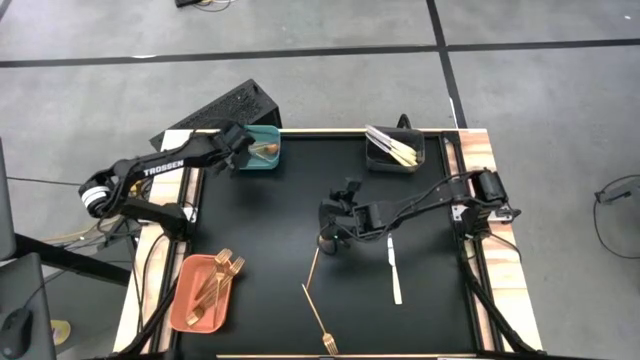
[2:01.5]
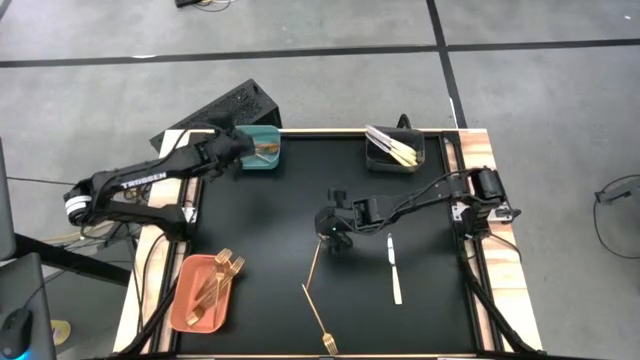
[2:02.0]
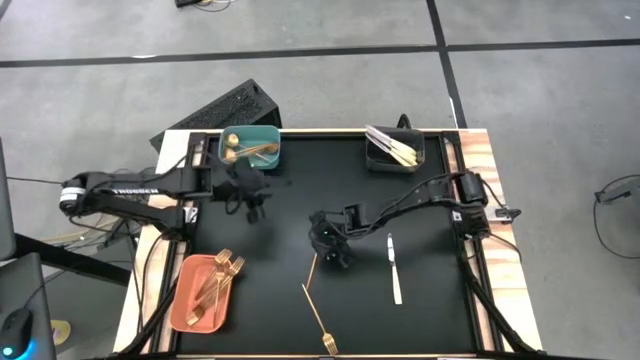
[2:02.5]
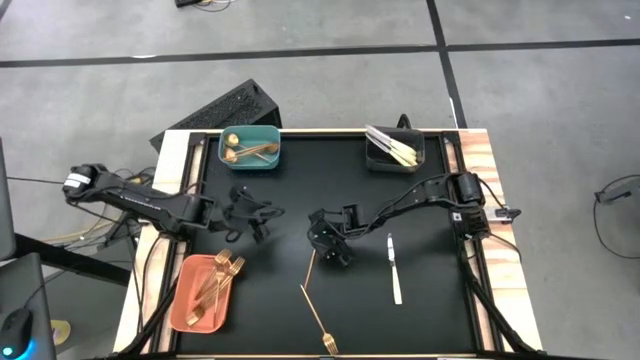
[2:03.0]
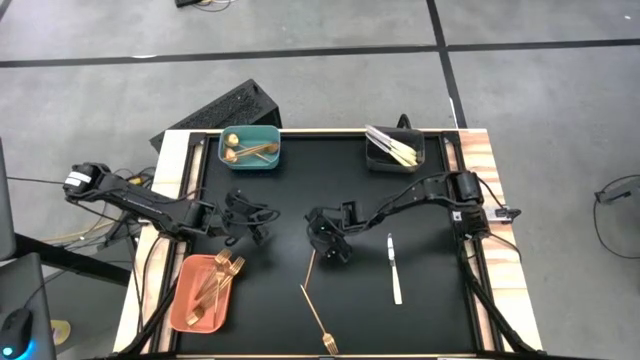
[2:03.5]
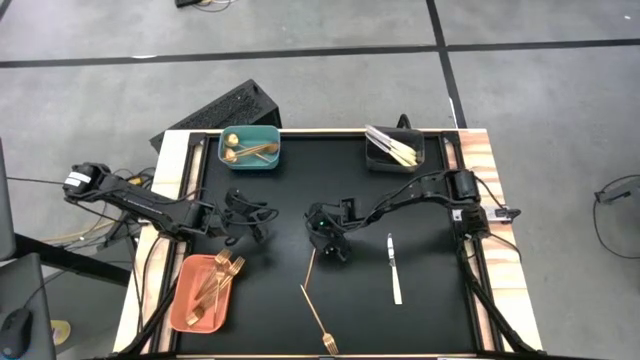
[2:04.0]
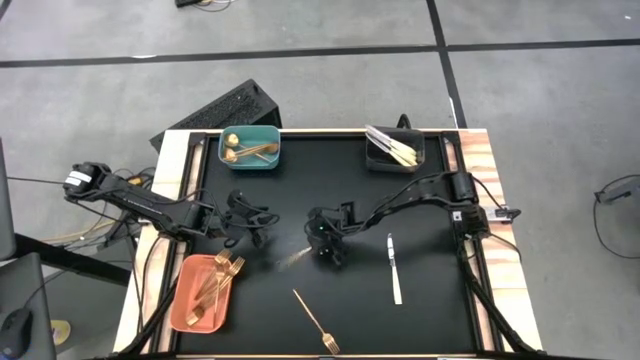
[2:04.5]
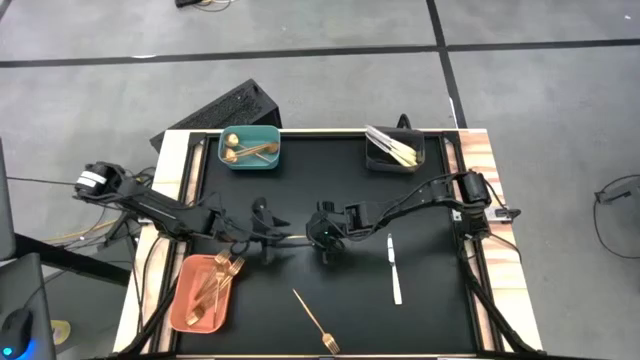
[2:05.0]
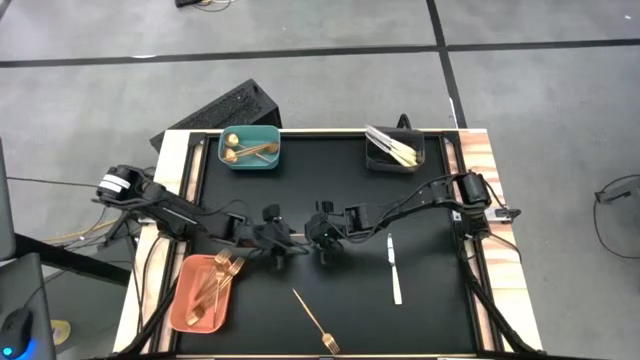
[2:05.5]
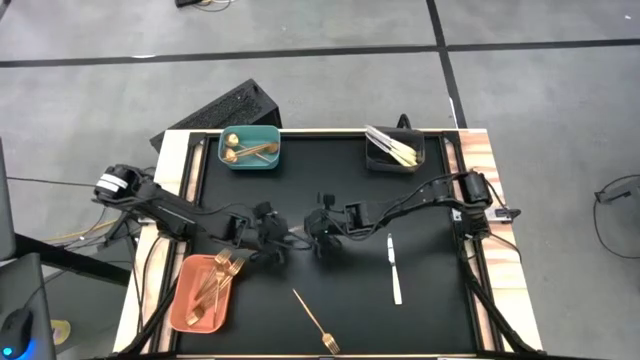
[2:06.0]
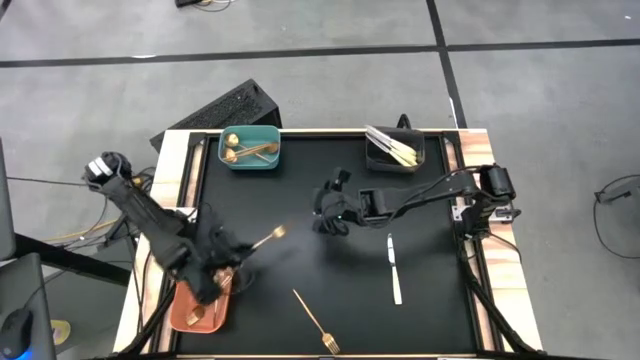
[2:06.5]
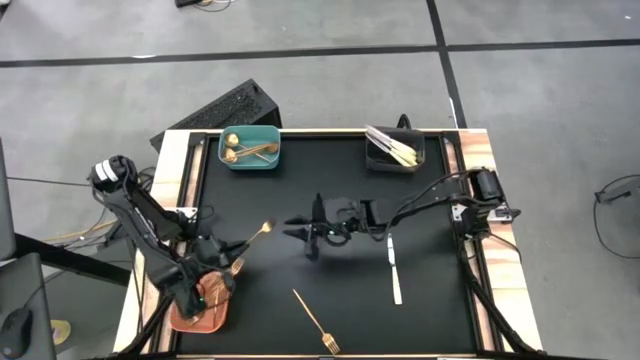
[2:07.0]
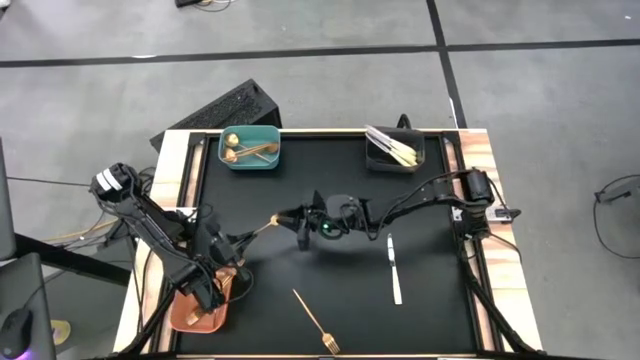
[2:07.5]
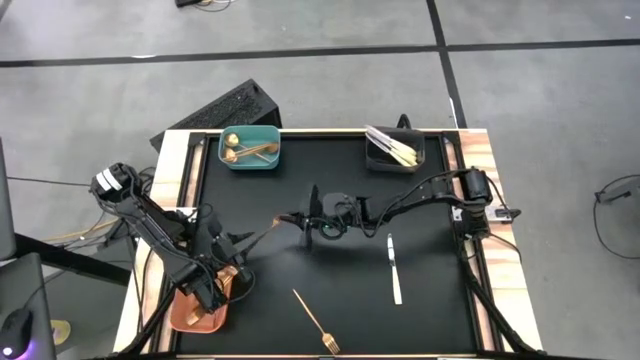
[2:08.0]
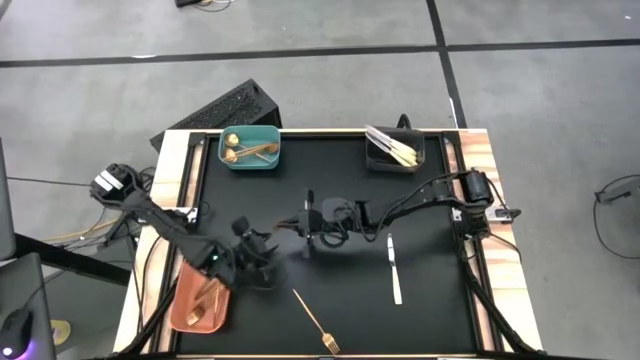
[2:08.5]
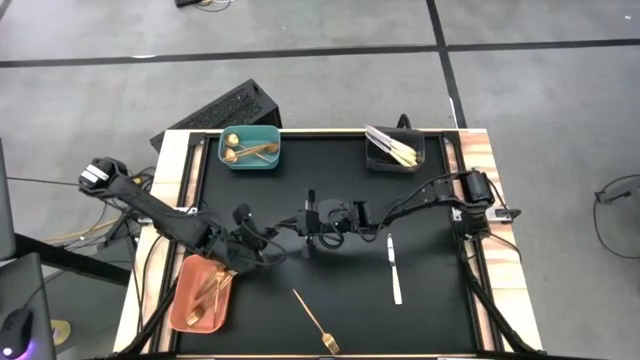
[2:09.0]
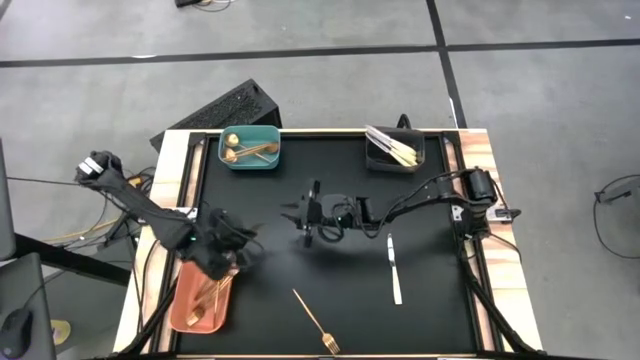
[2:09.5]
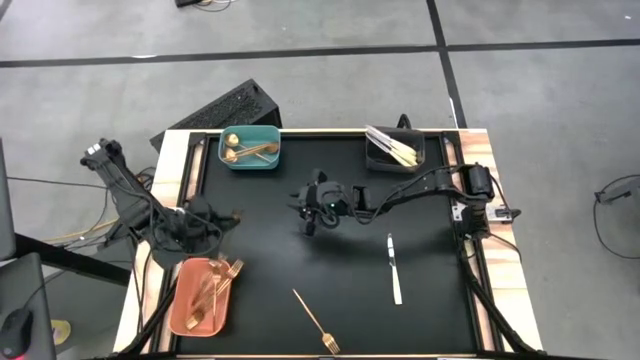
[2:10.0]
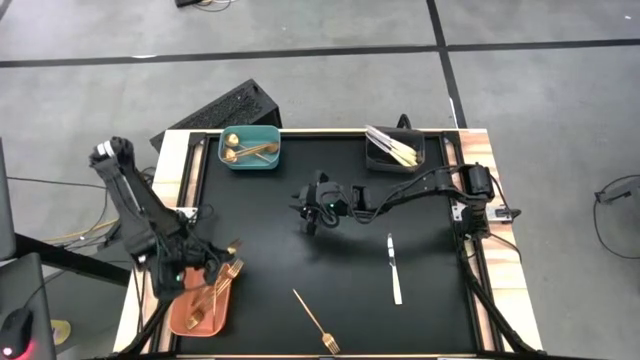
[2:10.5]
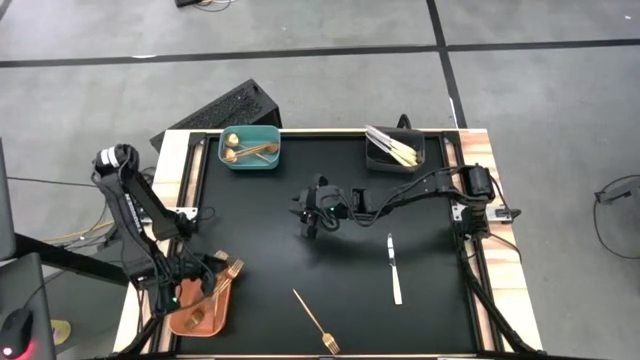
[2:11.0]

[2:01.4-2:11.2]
Task: Sort silverware by color (type)
Put the gold fork into the orange bin

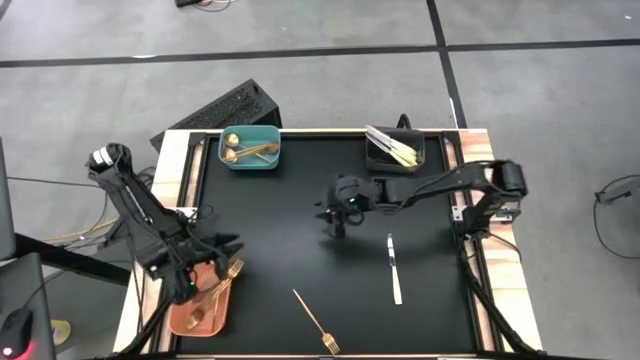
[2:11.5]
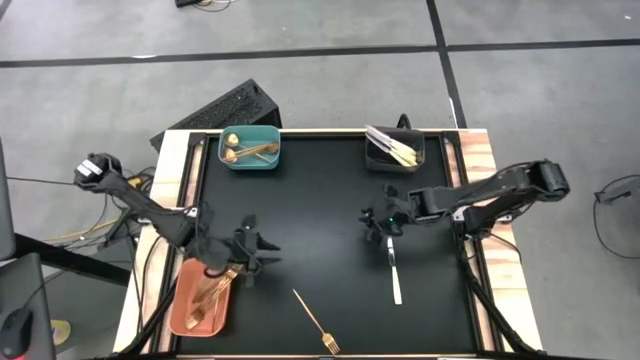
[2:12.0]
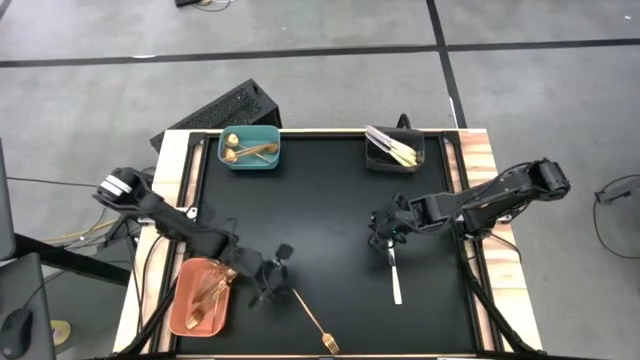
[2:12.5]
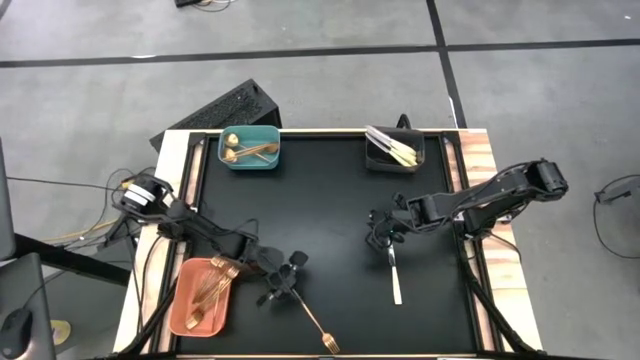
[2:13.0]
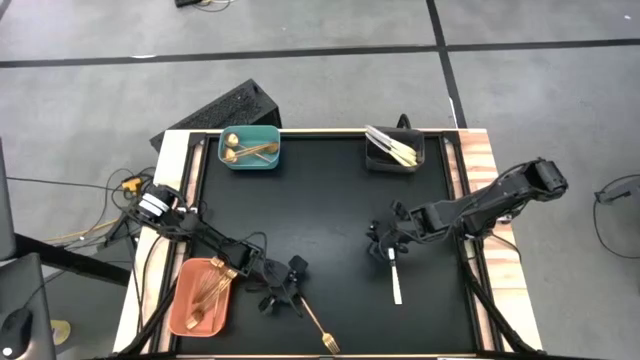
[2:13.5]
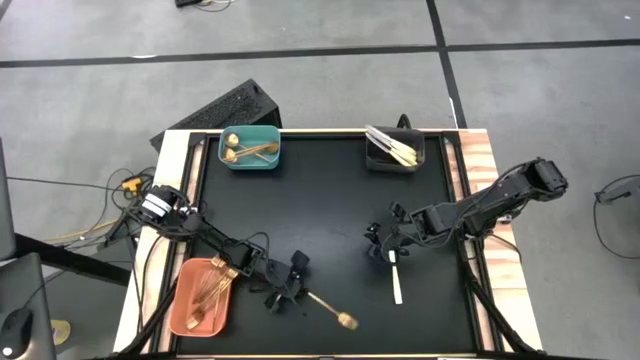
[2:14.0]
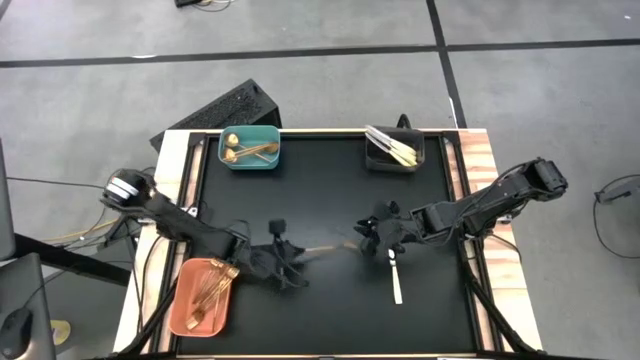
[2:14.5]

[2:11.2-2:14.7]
Put the gold fork into the orange bin

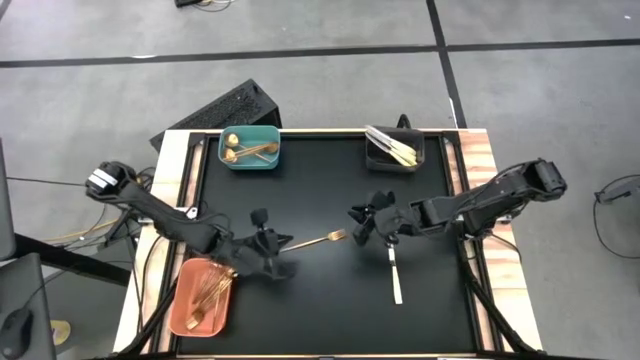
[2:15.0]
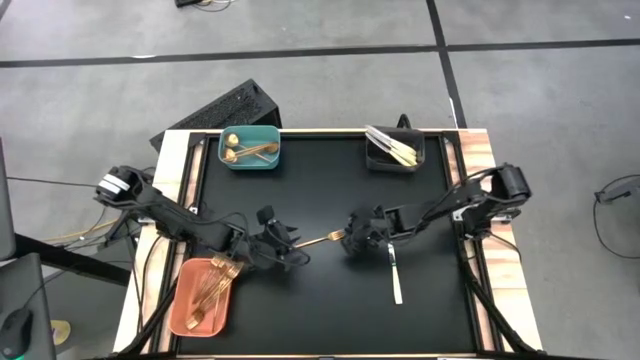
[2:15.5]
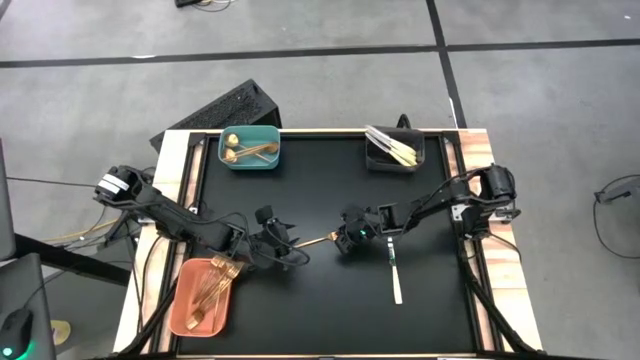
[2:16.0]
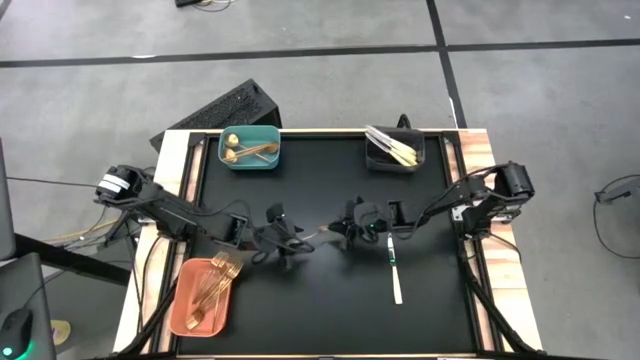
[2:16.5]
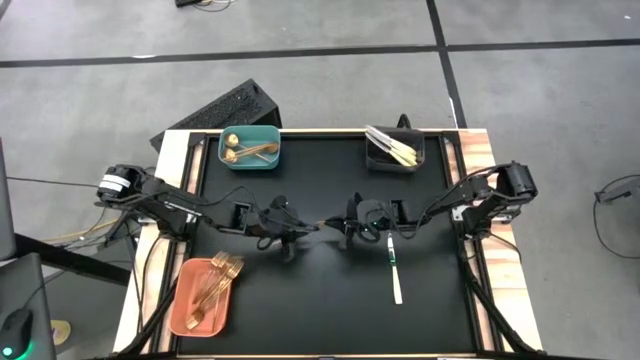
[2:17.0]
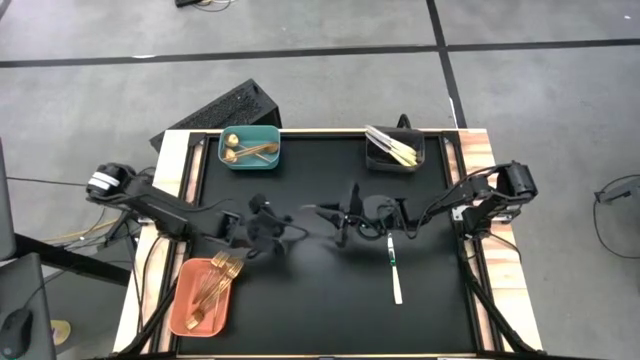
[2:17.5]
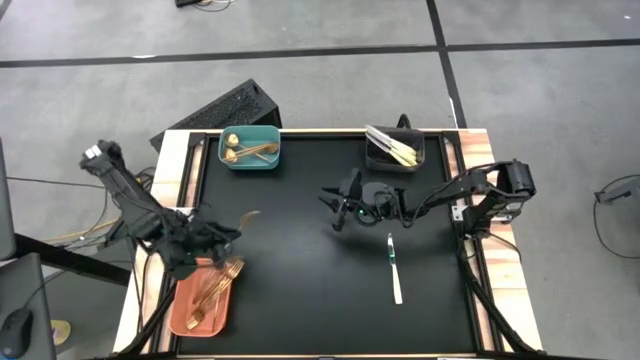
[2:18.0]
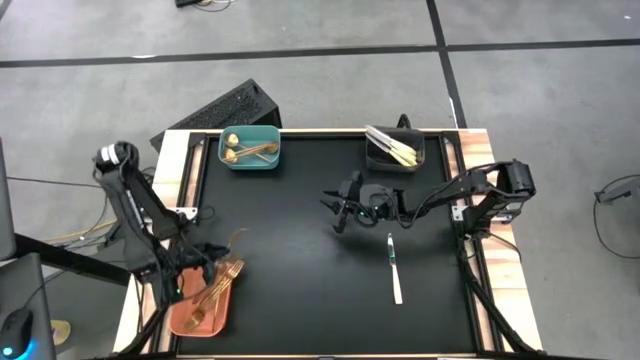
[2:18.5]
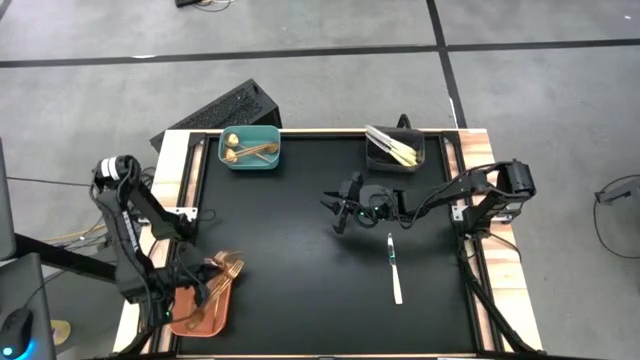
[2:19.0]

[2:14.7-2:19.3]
Put the gold fork into the orange bin

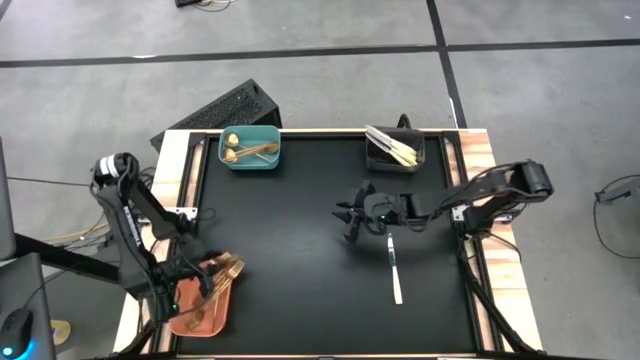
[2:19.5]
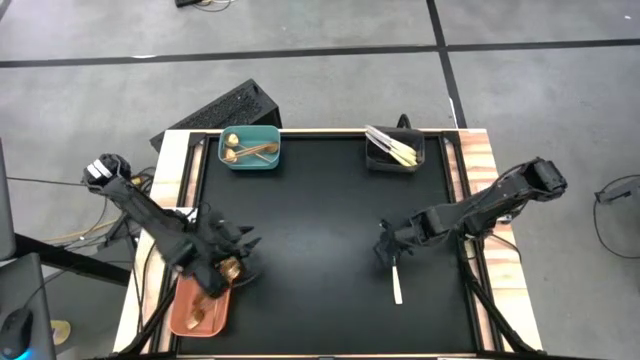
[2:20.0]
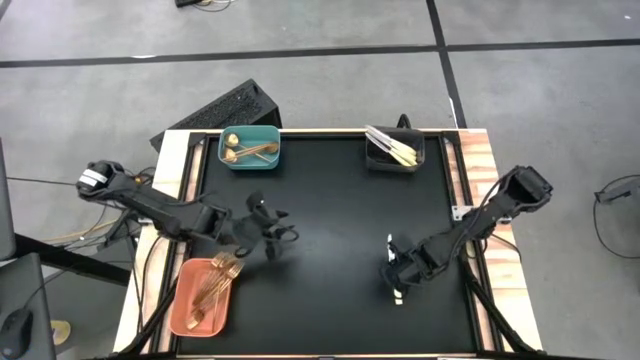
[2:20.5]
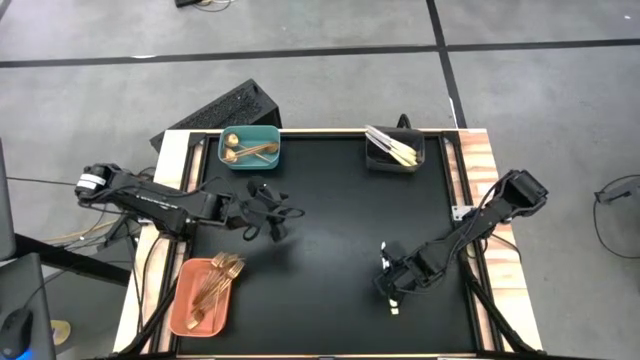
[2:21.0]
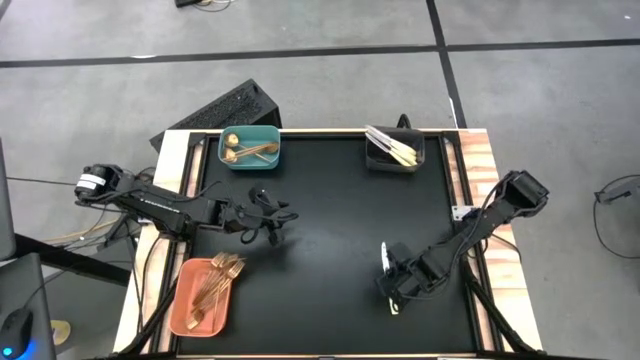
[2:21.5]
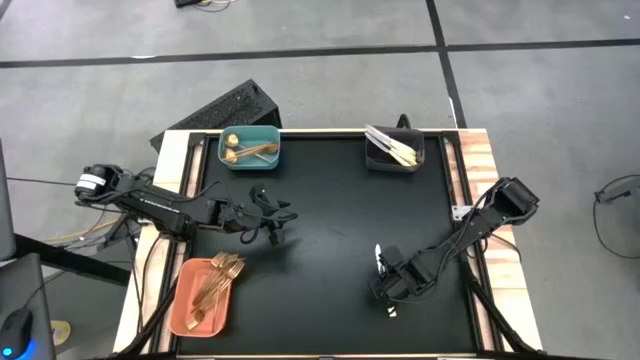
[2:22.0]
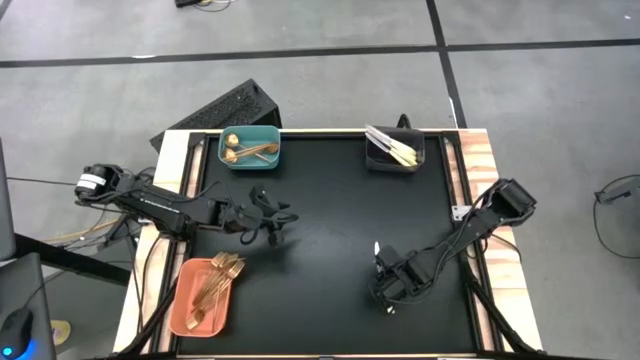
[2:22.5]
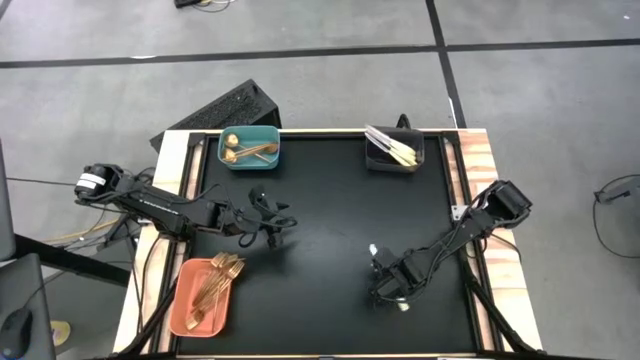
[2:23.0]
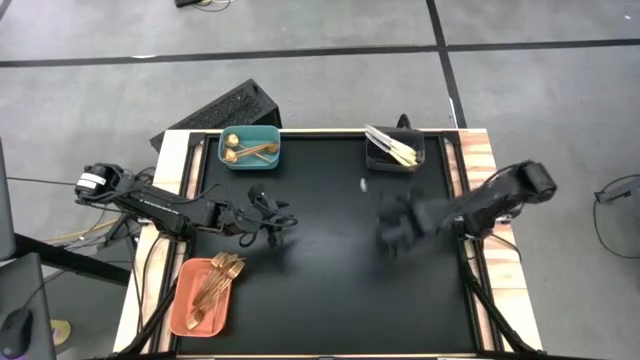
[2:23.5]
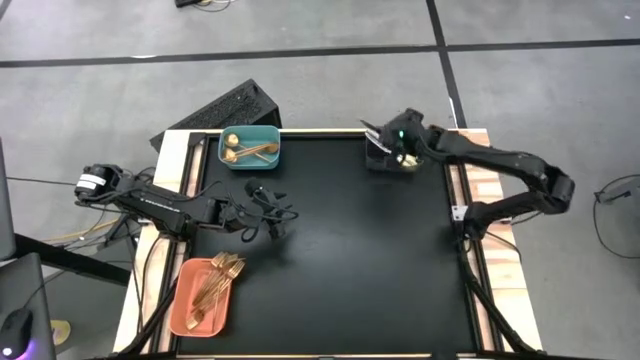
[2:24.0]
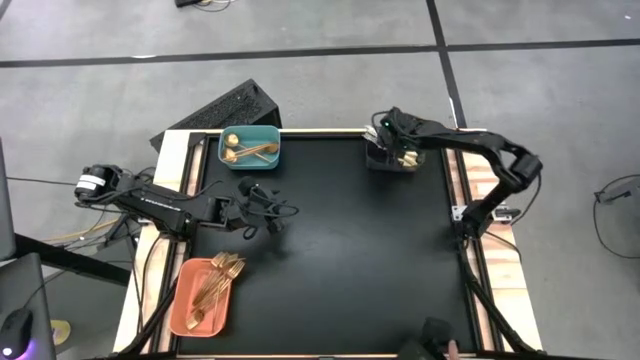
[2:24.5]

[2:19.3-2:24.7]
Put the white knife into the black bin
